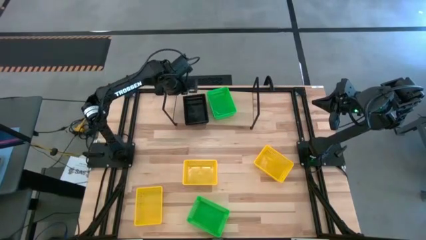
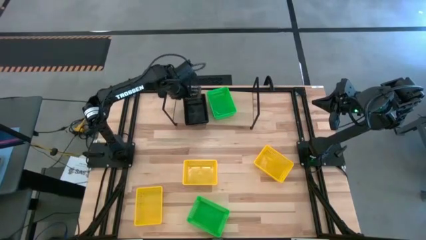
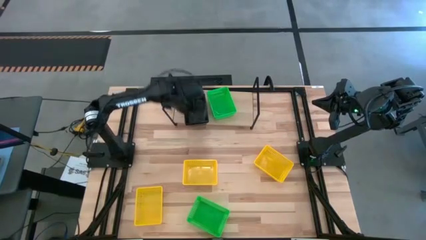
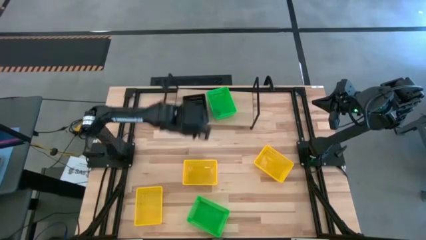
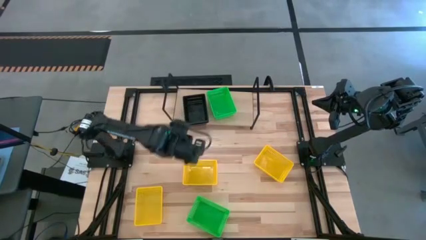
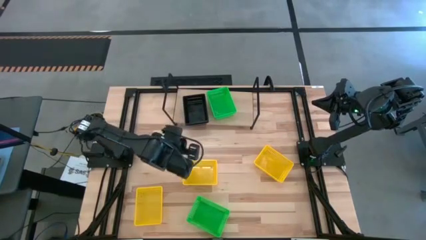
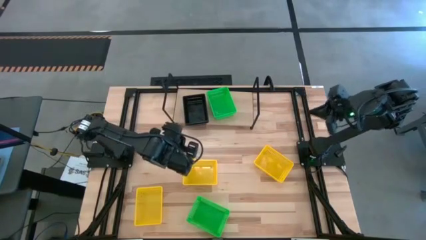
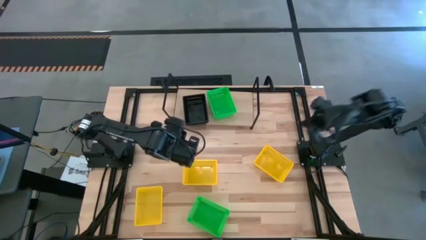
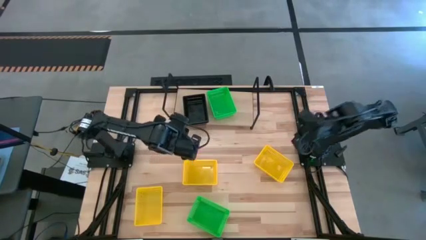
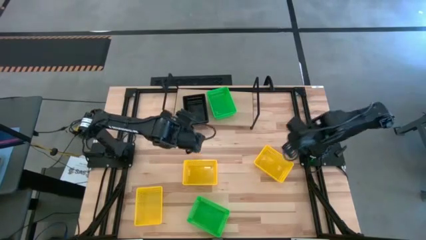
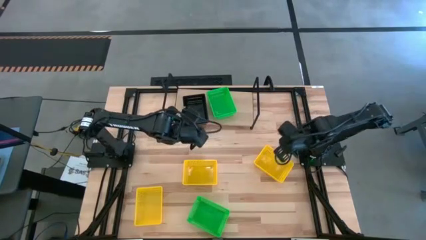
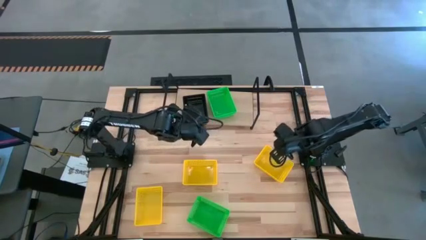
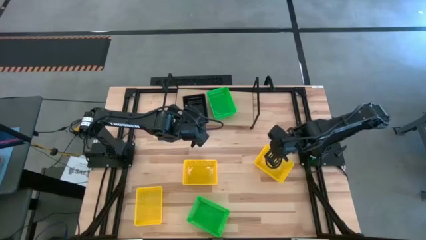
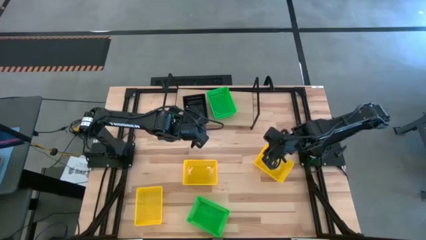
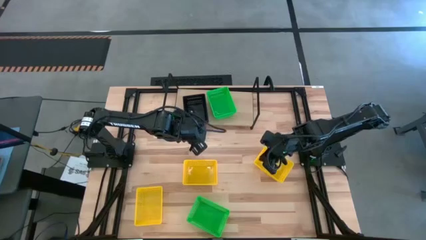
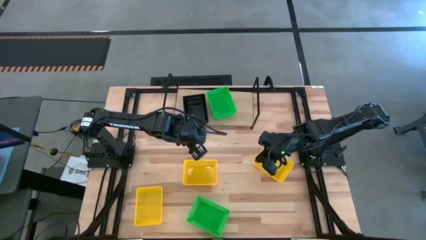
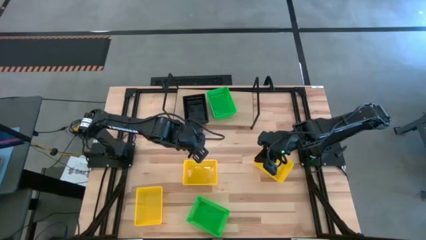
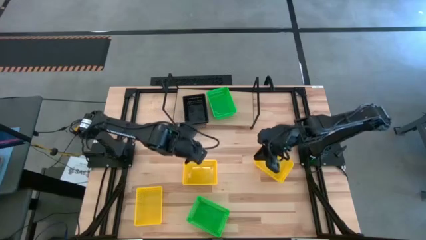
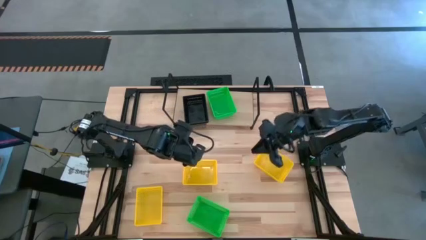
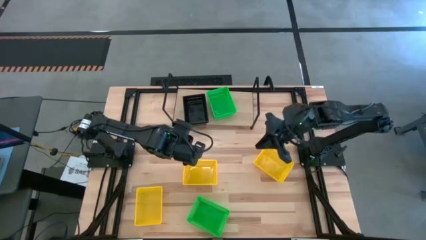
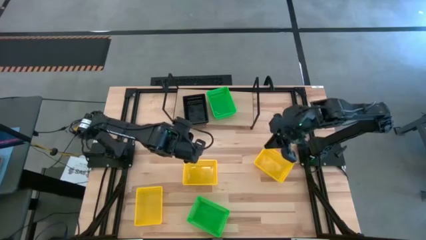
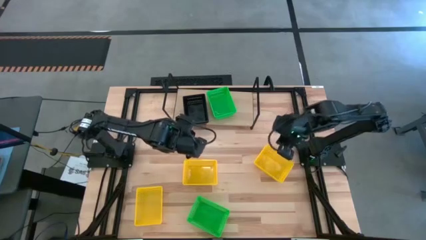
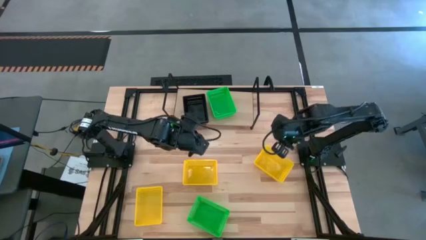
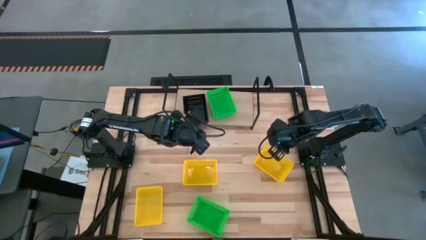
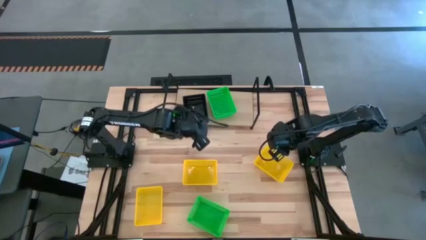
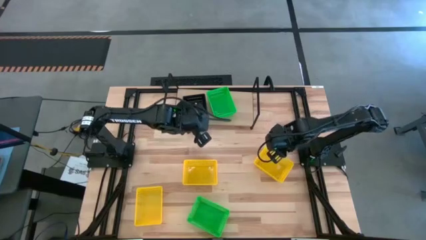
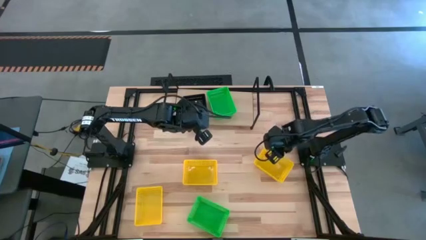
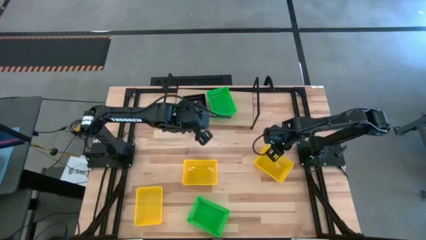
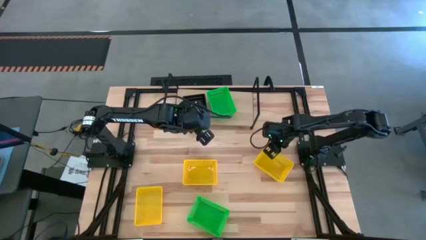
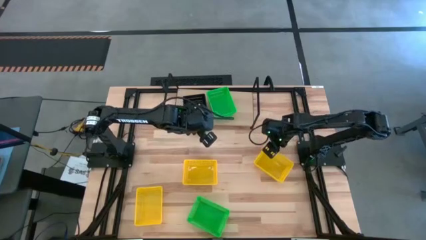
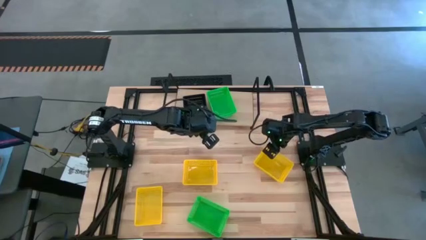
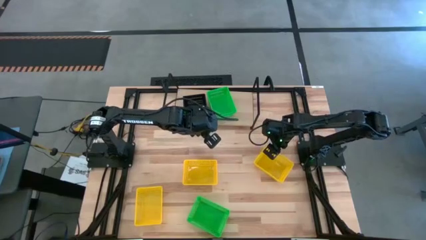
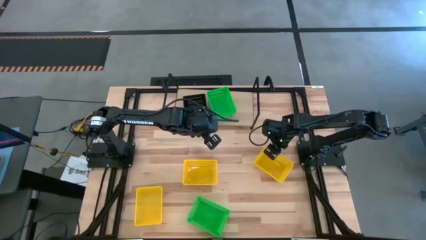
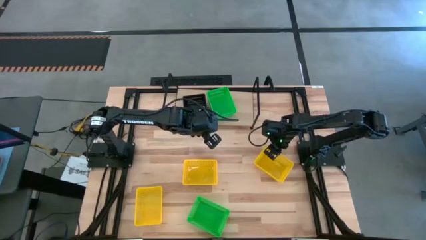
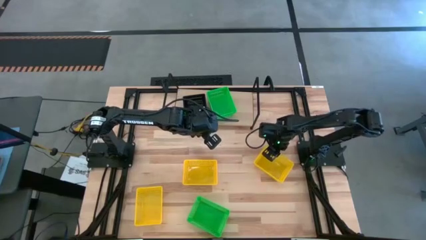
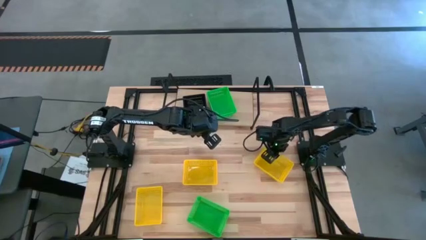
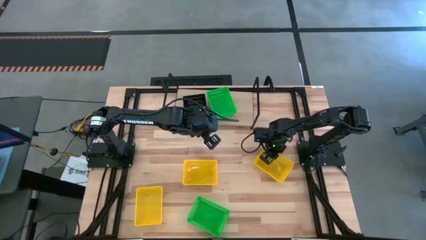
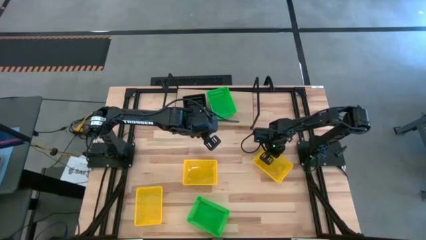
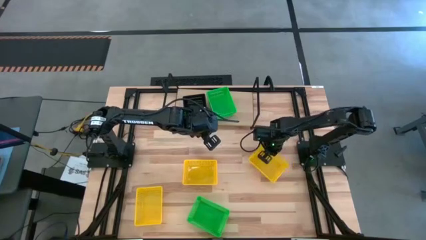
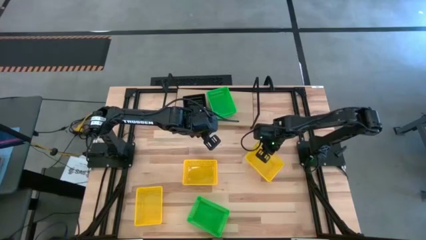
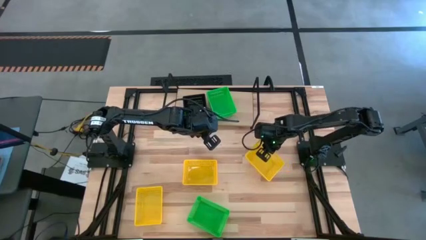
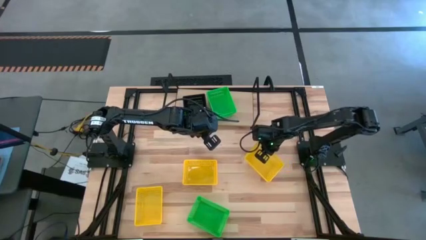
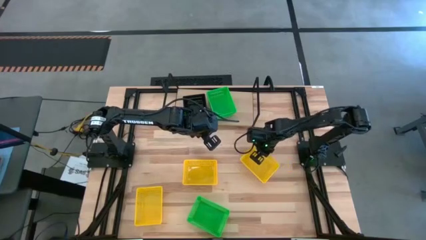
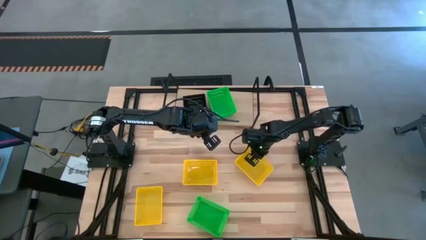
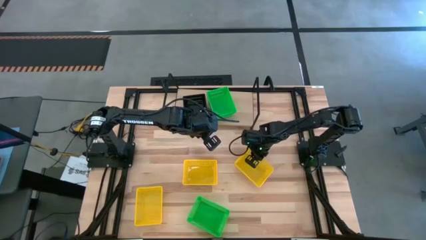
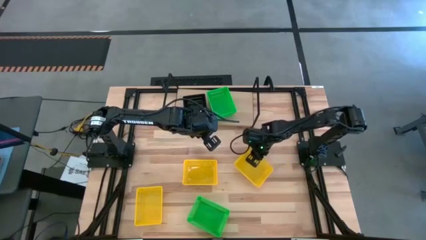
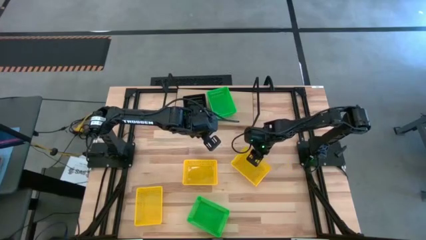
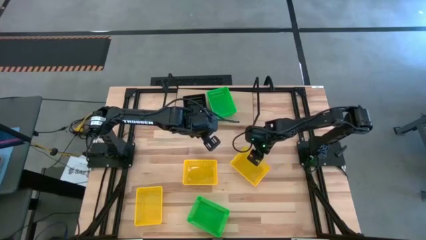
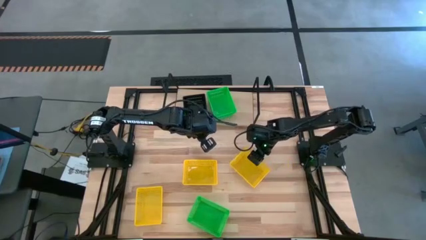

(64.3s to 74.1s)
Task: Stack baskets on shelf by color
Move the top right yellow bin to the center of the table

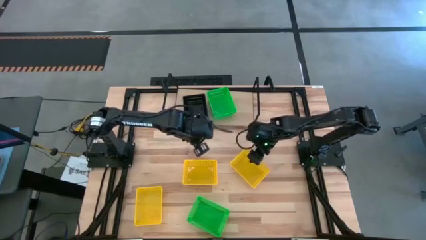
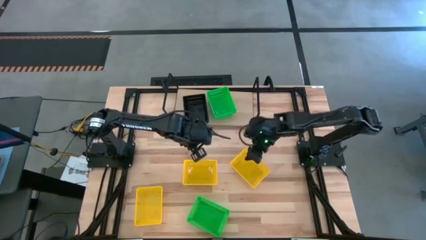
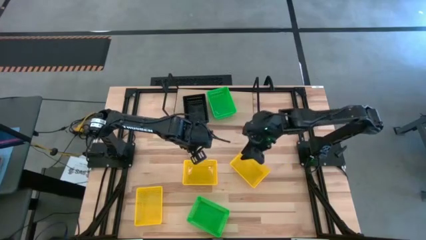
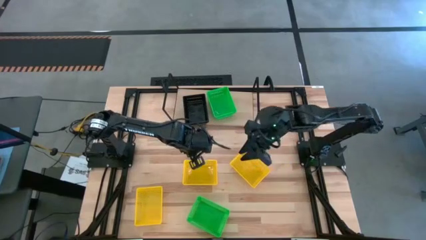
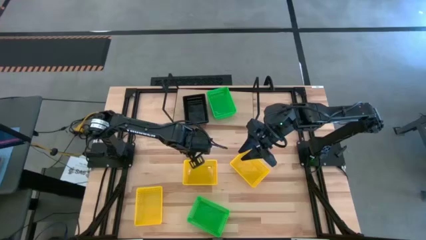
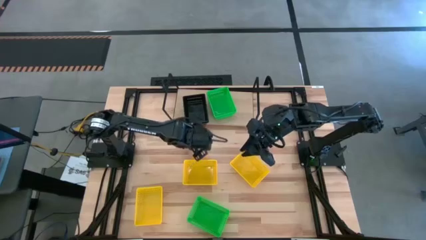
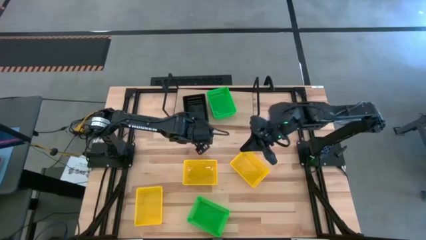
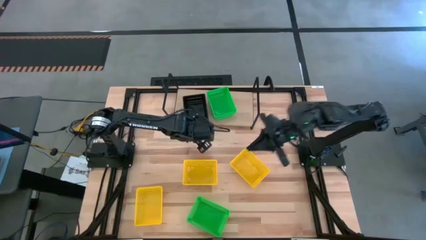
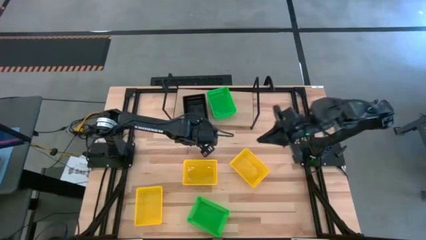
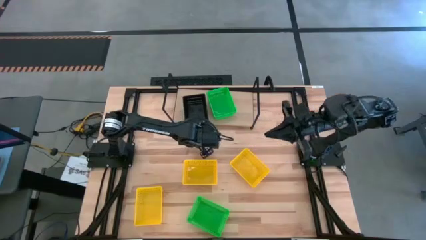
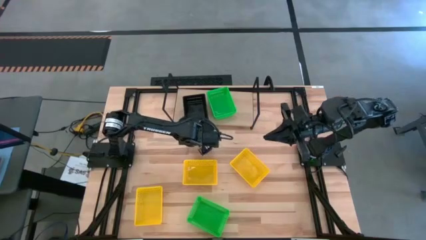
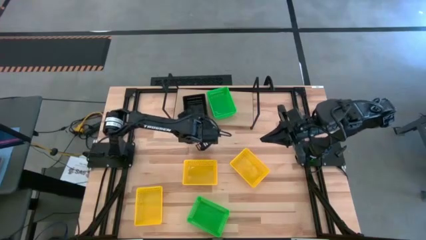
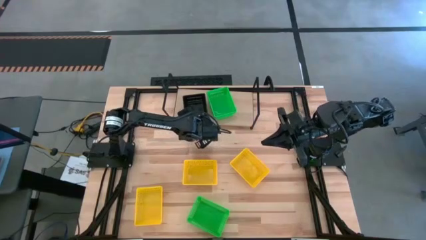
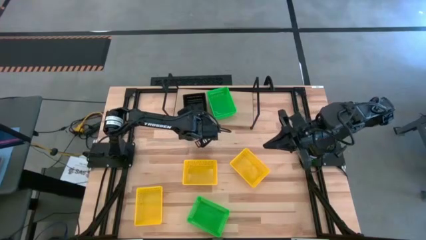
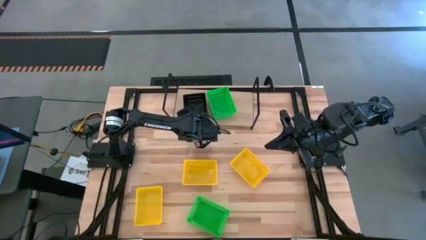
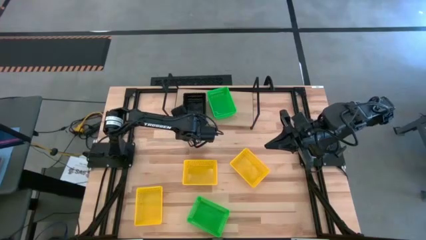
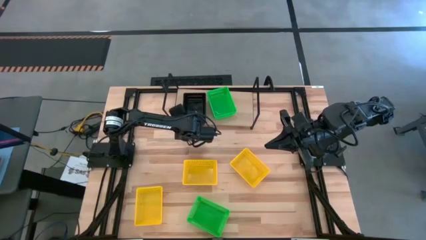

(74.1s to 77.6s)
Adjust the black bin on the shelf

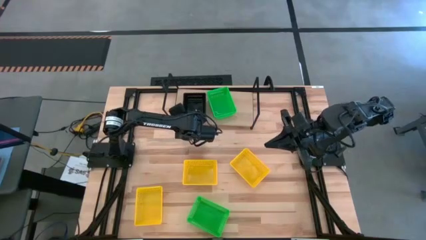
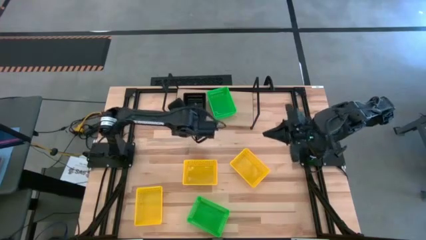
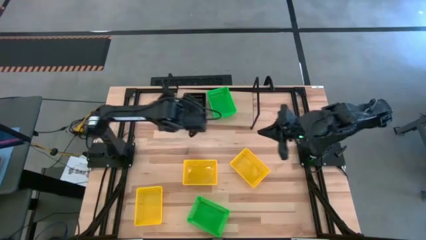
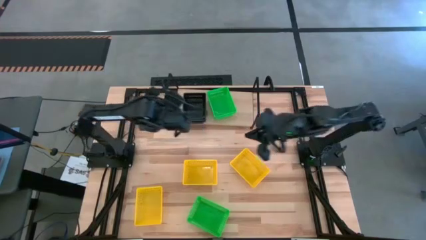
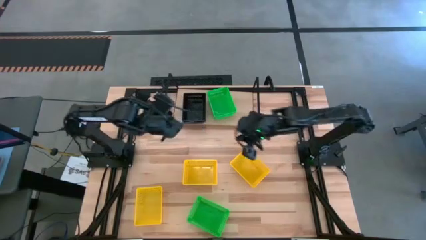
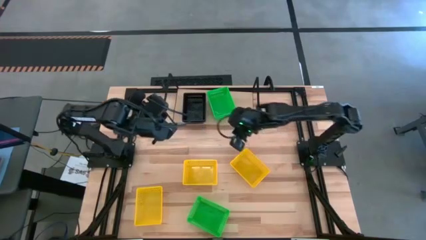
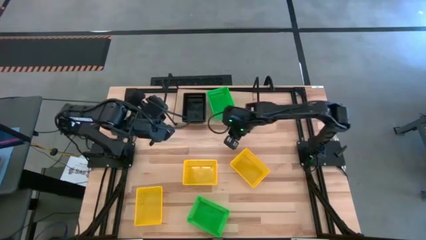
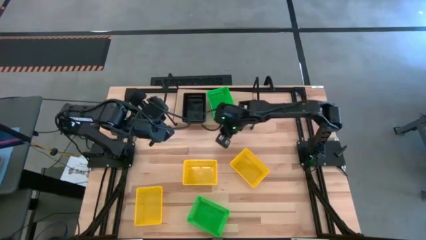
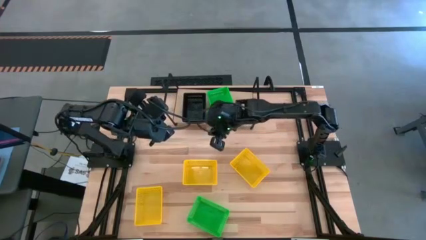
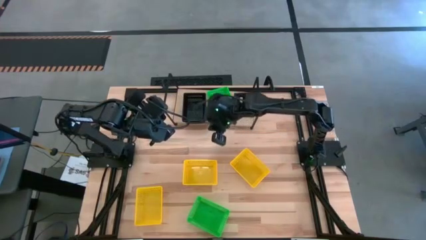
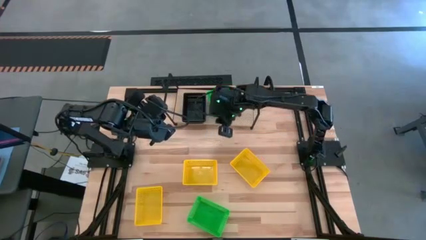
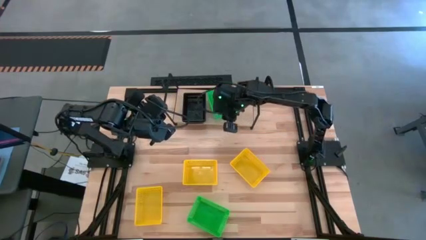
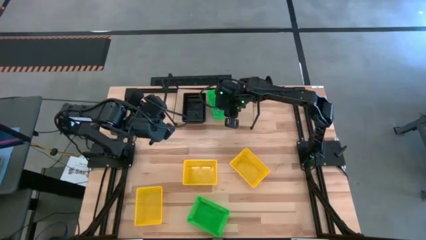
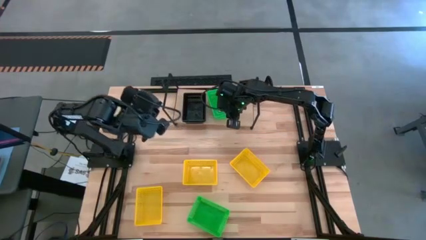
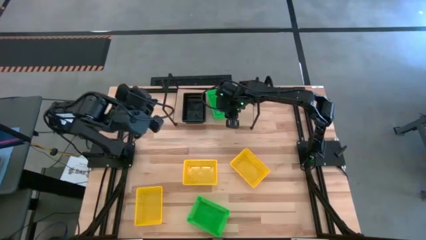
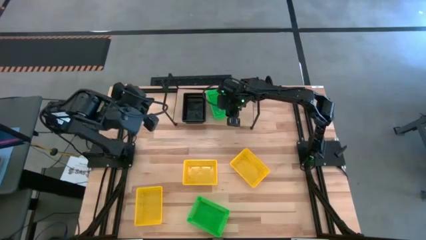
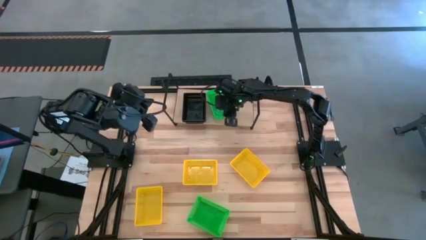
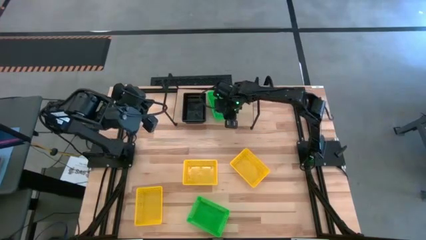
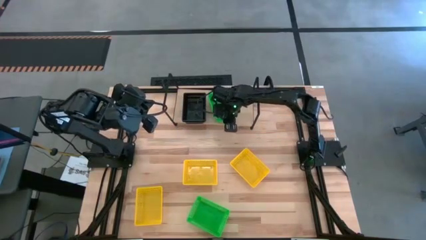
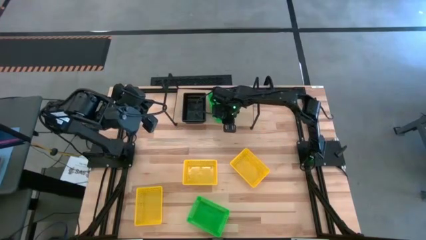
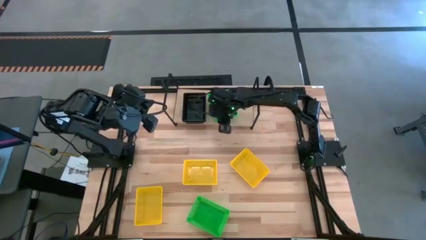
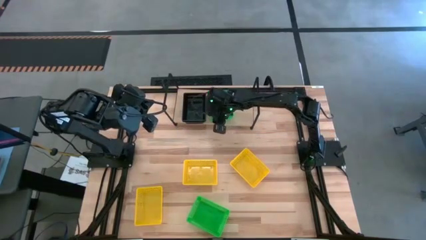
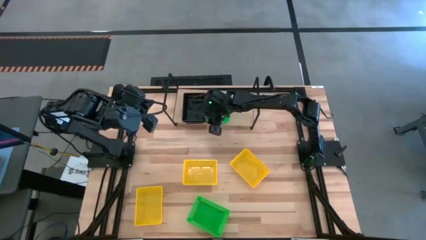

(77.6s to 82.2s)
Adjust the green bin on the shelf
